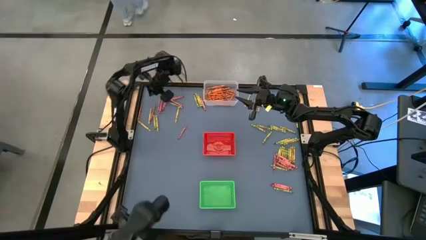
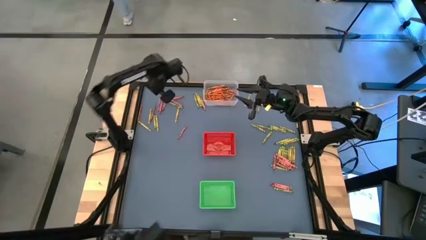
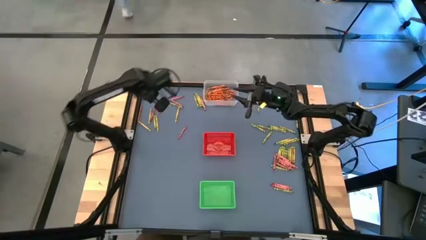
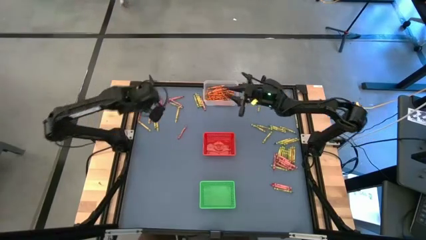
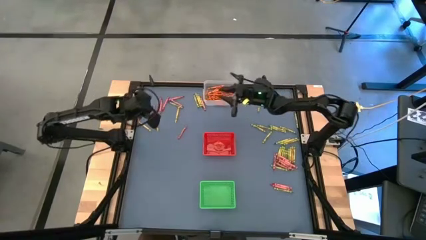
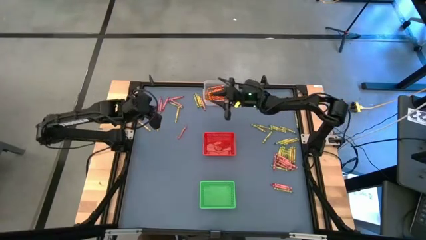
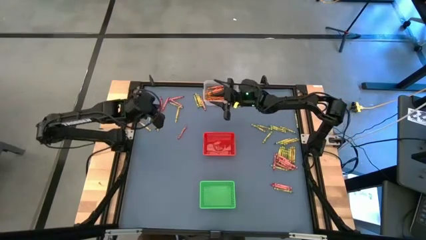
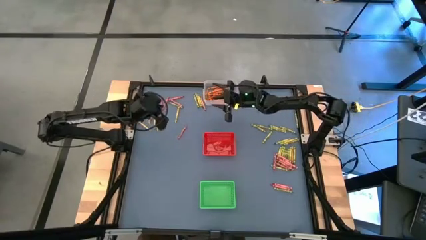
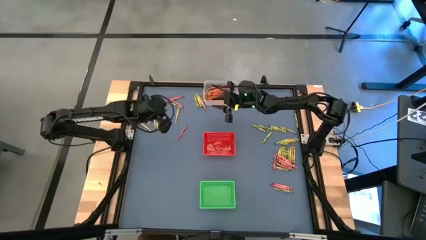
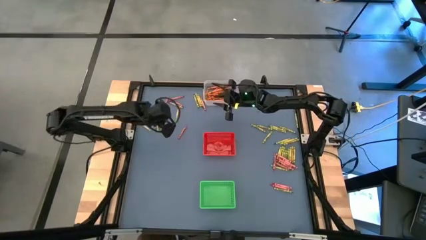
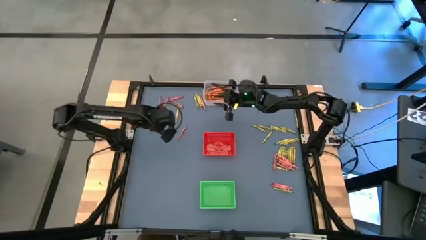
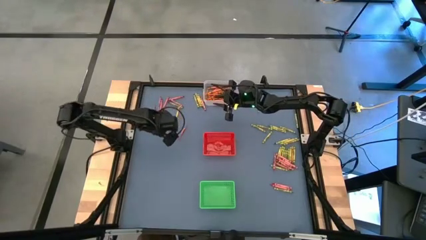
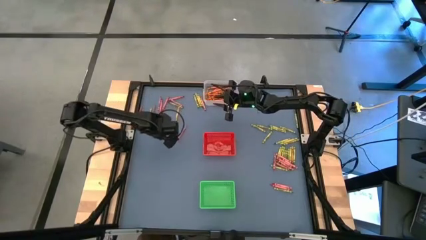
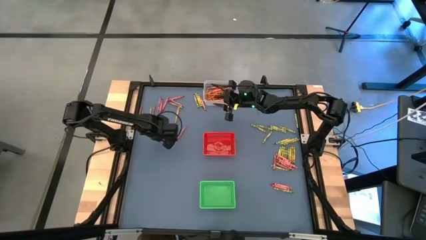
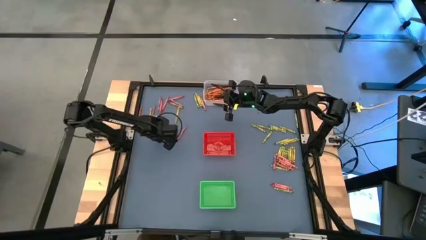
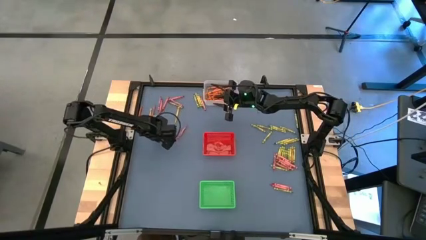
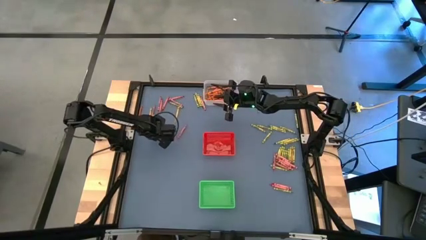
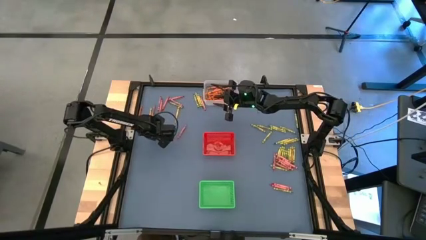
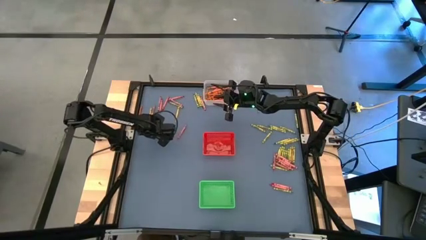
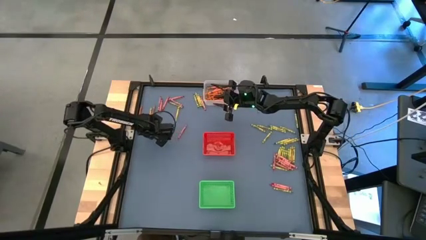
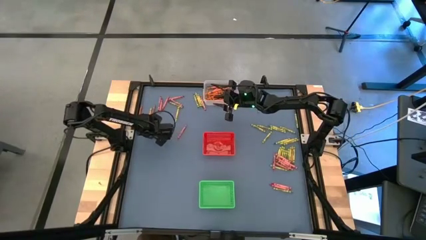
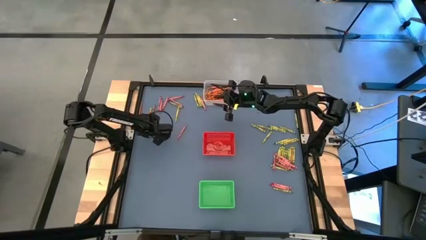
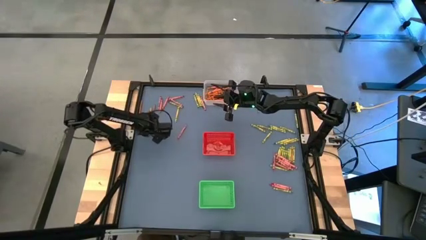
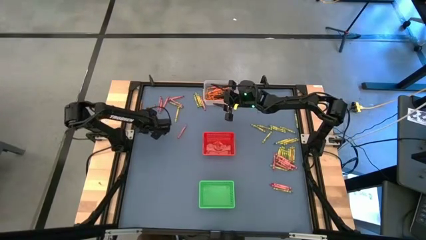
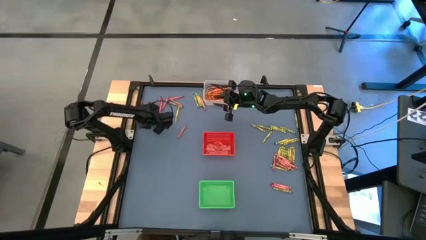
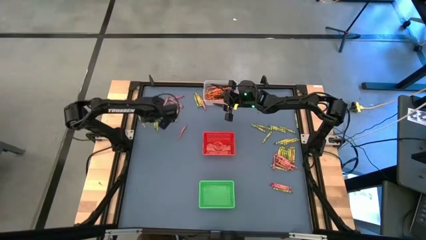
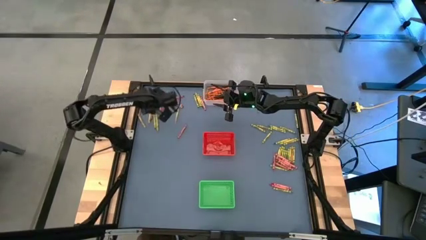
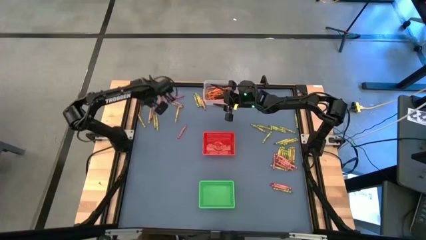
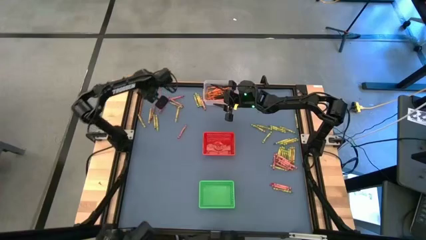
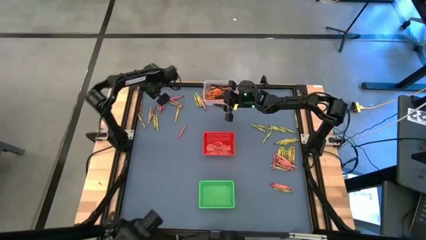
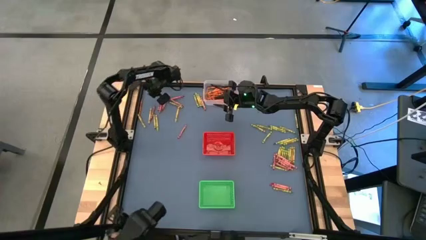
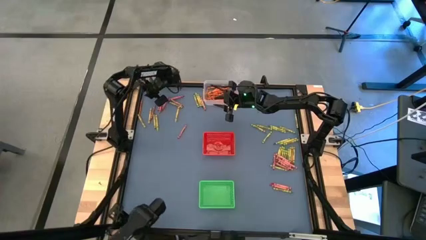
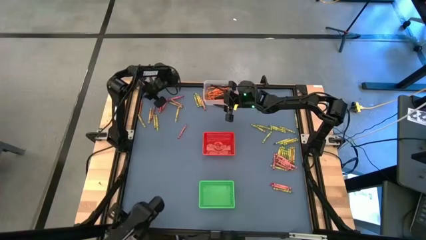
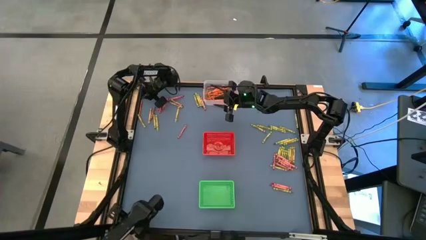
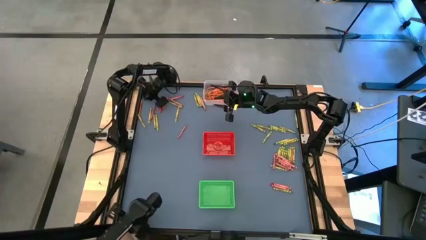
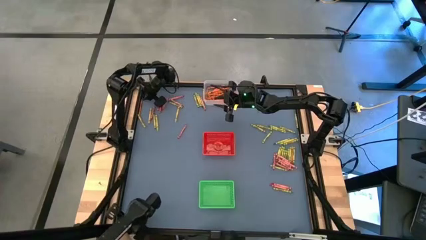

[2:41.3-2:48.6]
Task: Sort crayons
Adjust the yellow crayon

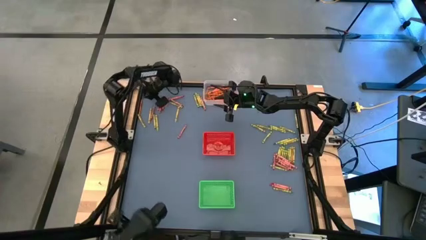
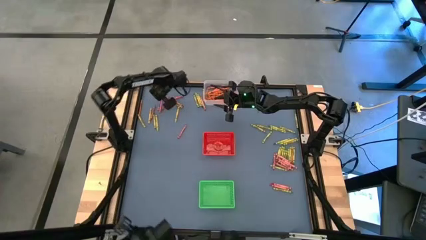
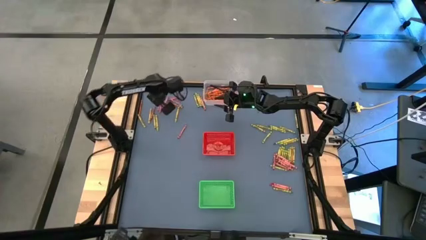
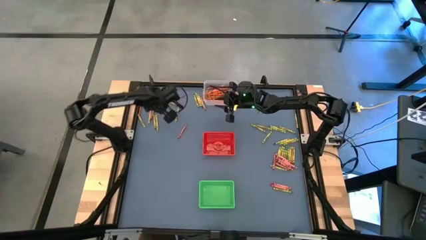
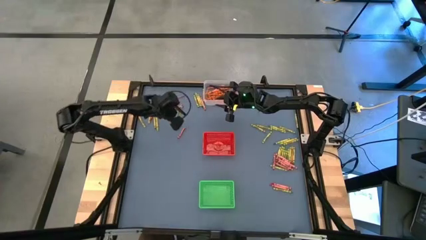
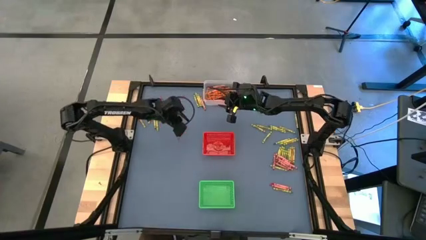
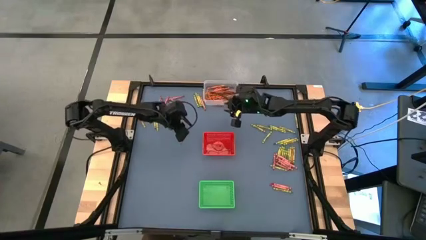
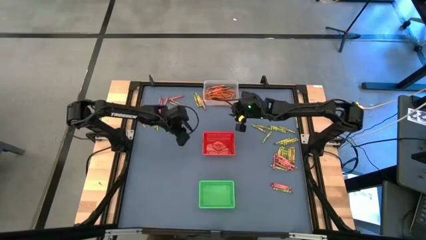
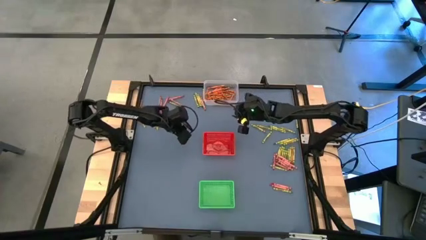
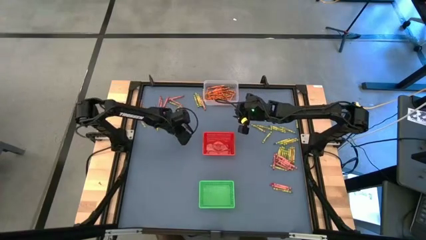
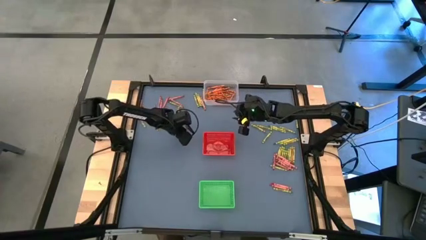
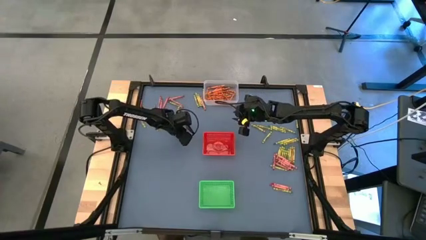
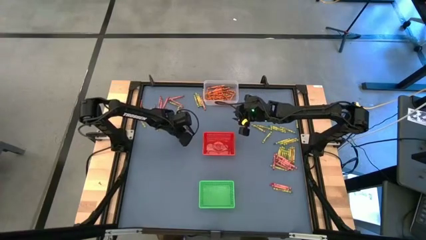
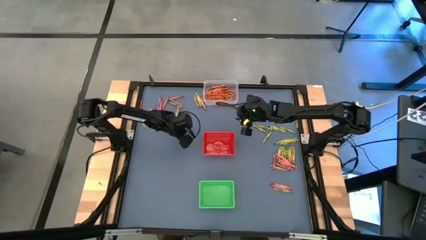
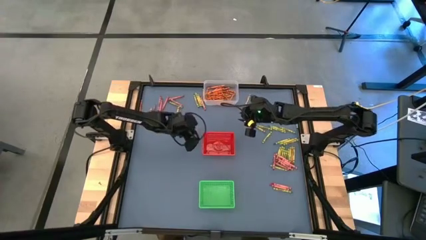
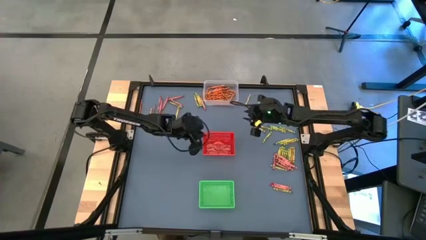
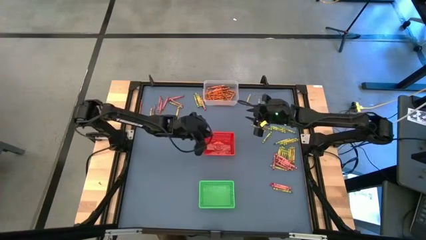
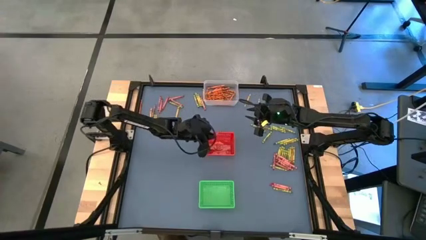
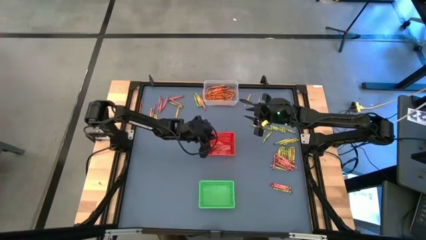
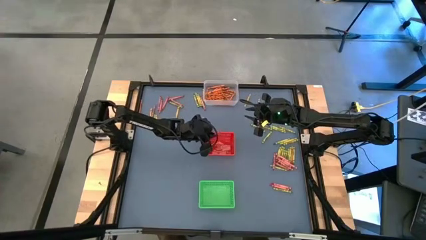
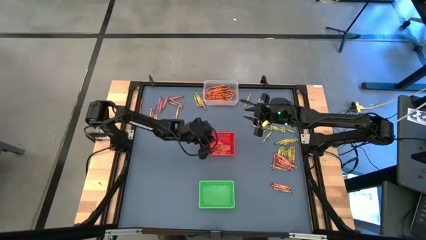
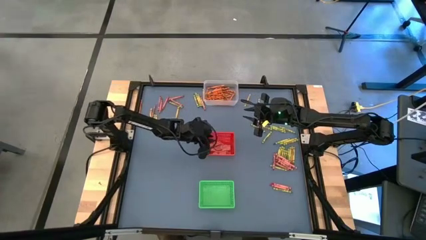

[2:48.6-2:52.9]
Put the red crayon into the red bin

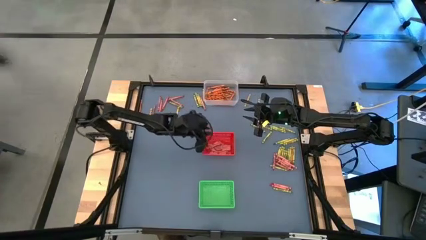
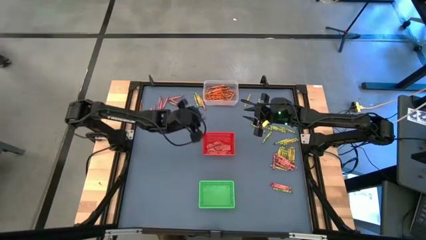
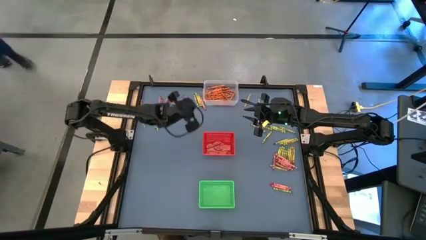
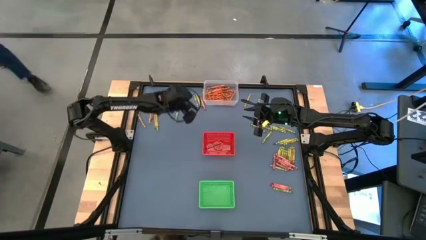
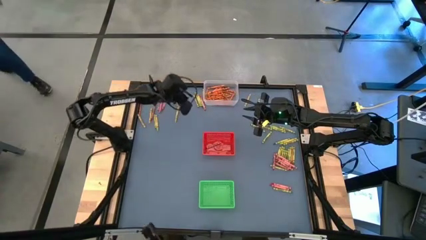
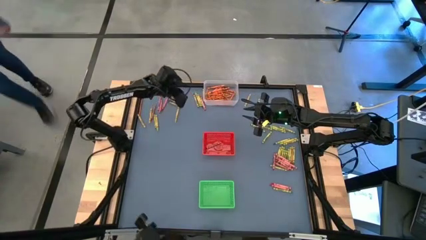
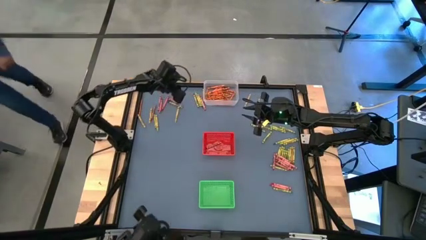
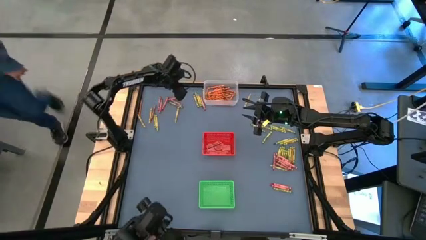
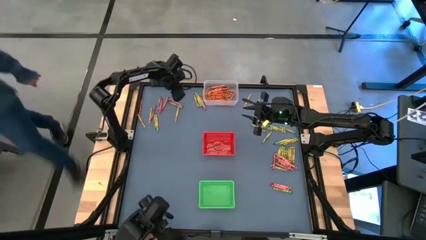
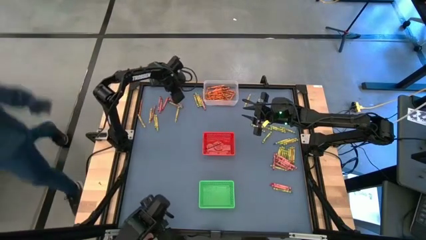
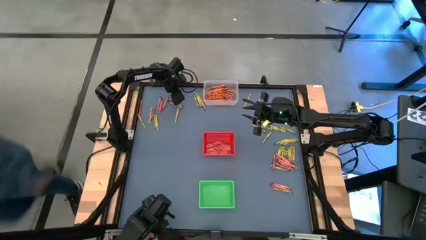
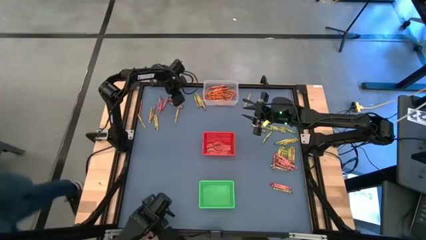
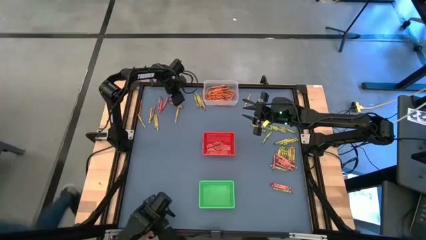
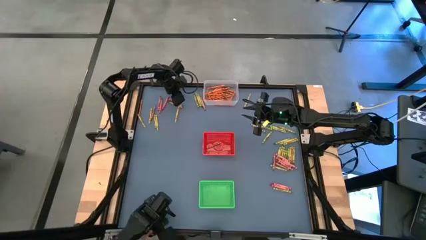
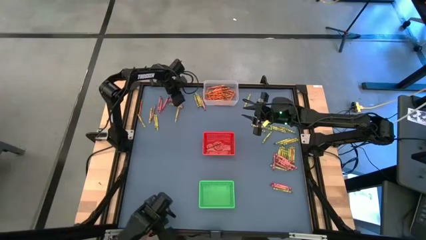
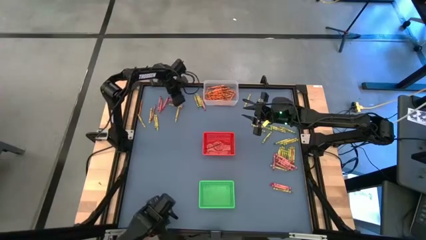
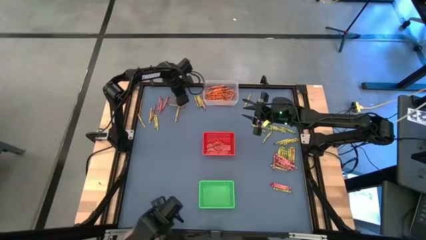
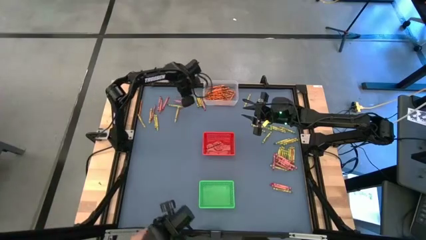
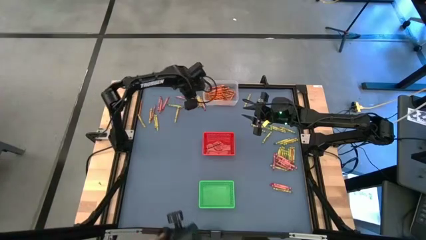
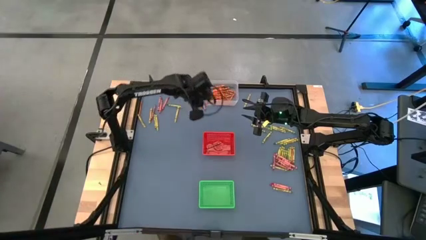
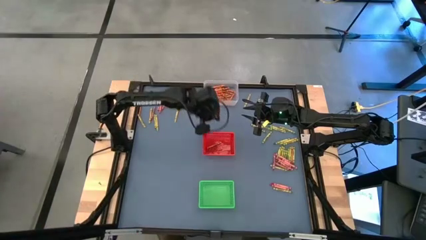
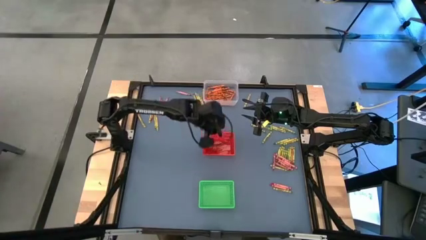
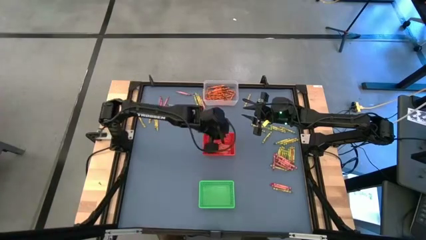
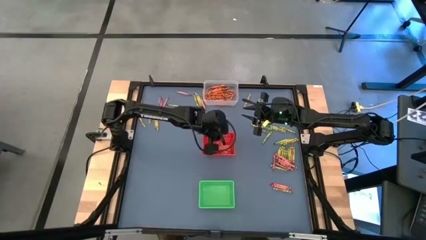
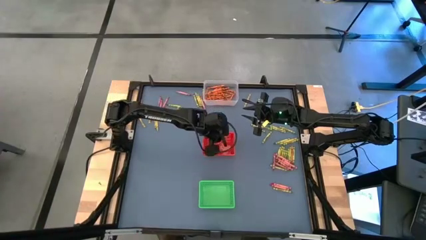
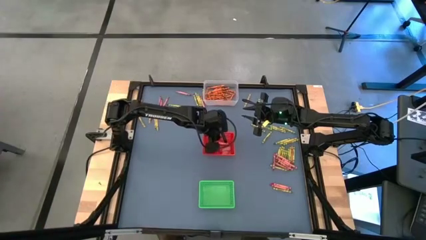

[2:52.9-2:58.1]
Put the red crayon into the red bin
